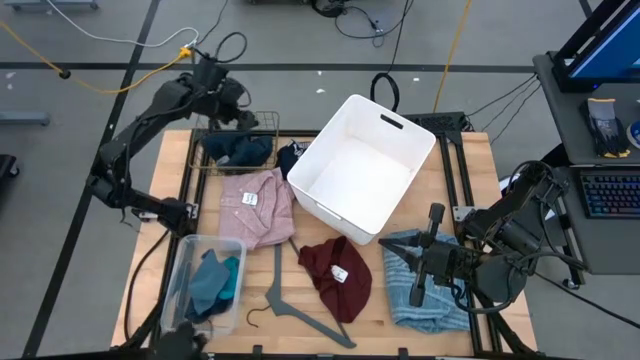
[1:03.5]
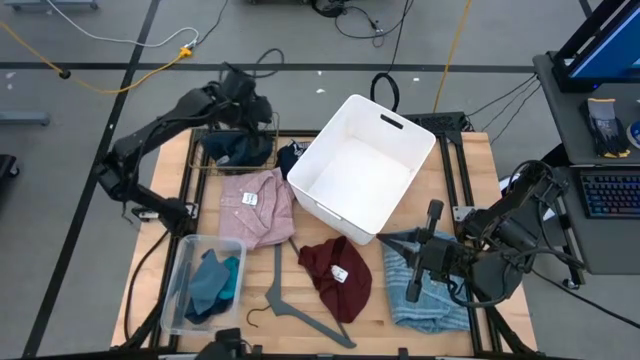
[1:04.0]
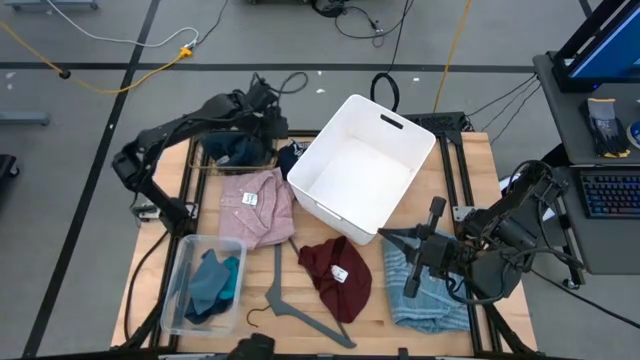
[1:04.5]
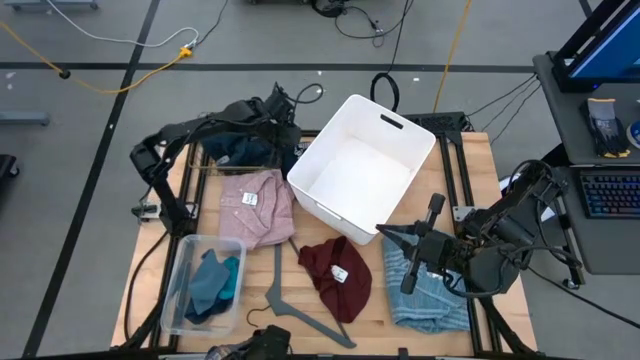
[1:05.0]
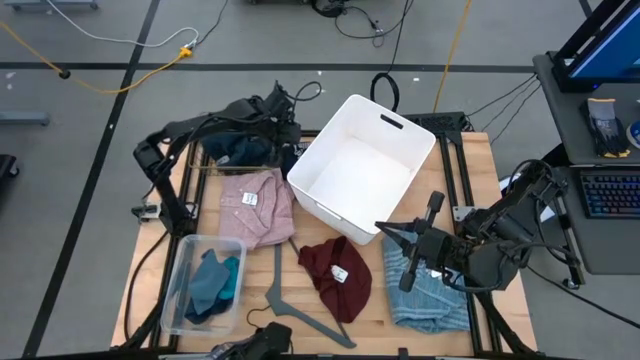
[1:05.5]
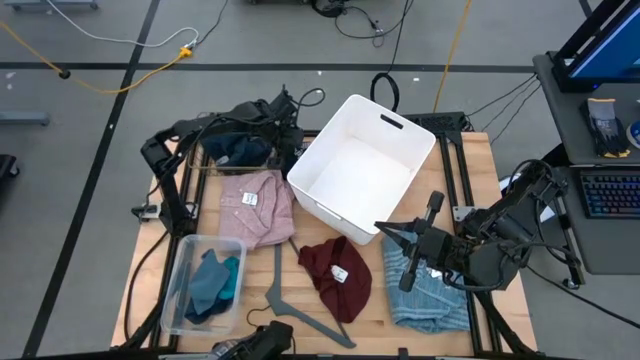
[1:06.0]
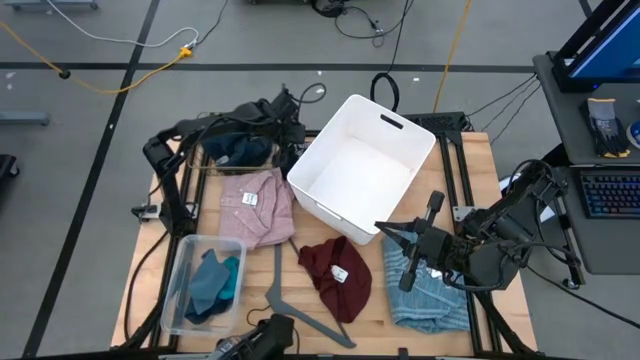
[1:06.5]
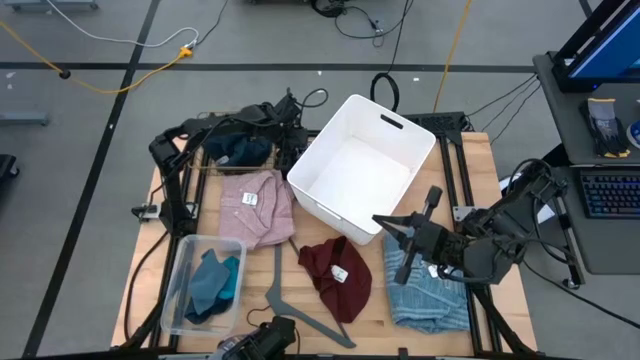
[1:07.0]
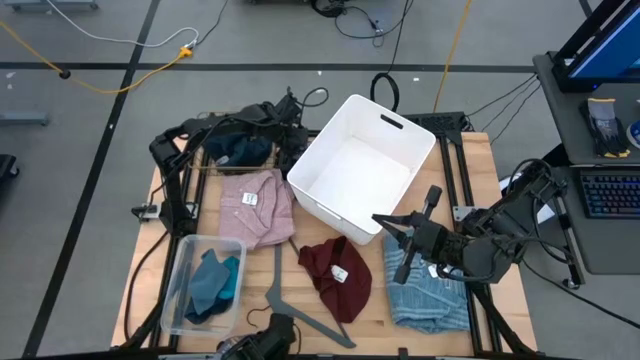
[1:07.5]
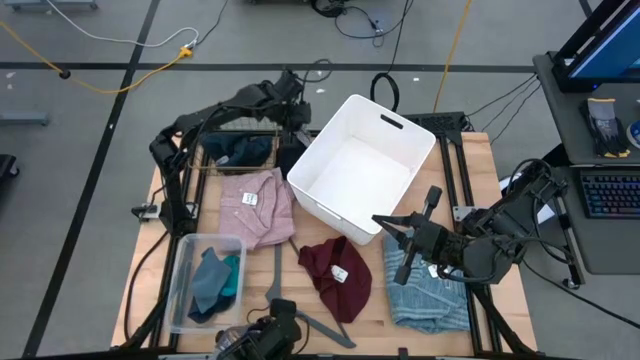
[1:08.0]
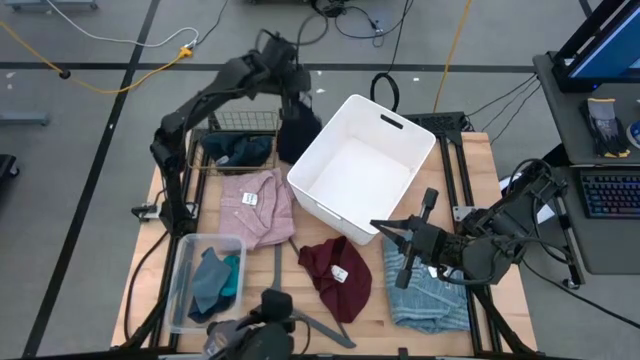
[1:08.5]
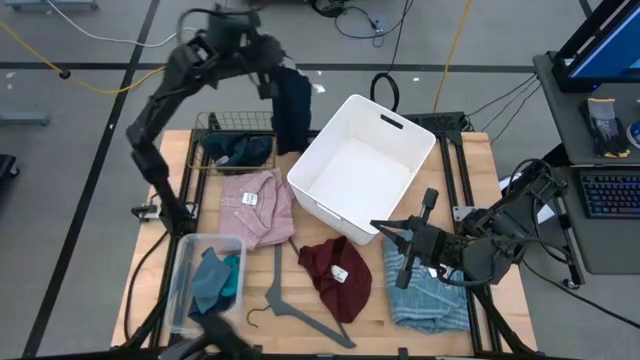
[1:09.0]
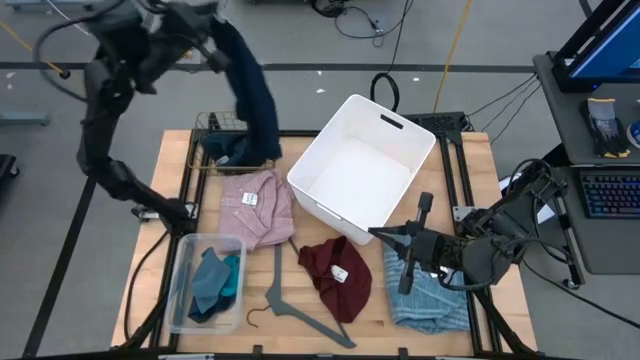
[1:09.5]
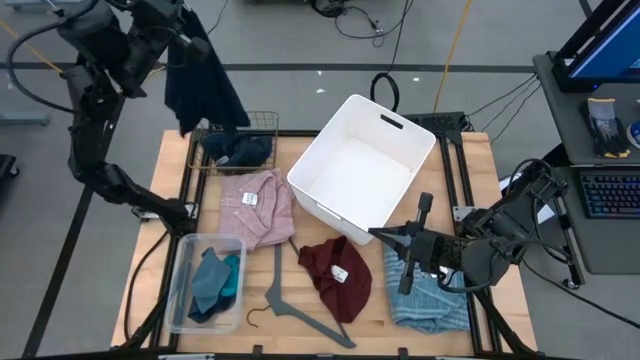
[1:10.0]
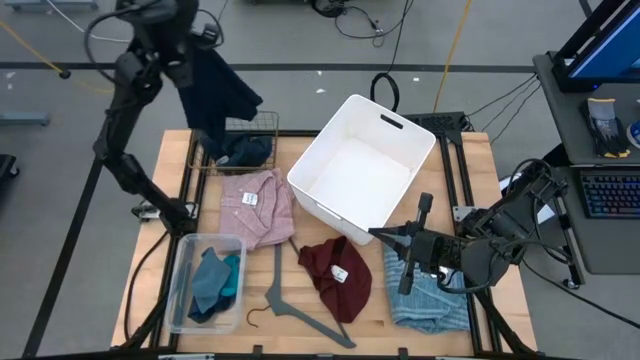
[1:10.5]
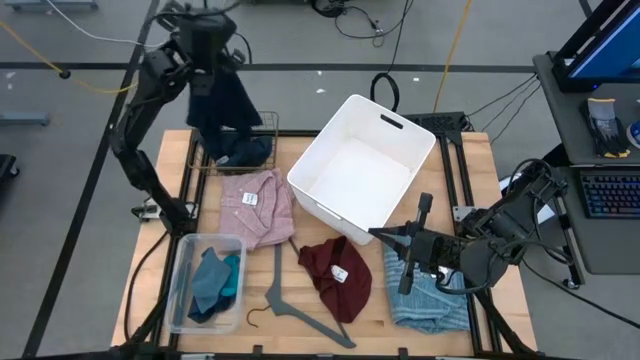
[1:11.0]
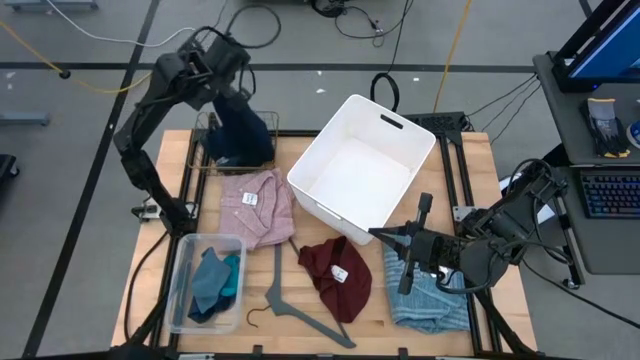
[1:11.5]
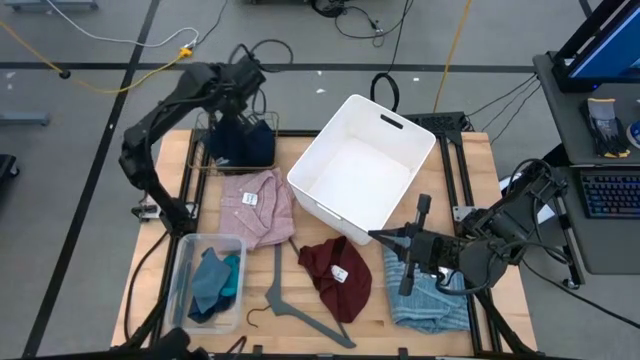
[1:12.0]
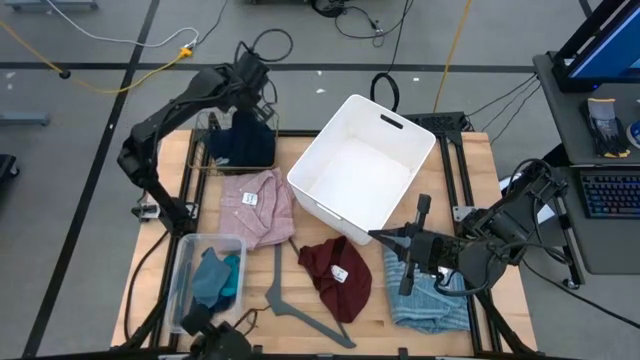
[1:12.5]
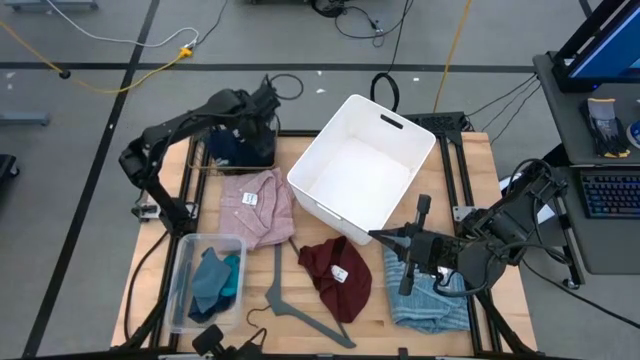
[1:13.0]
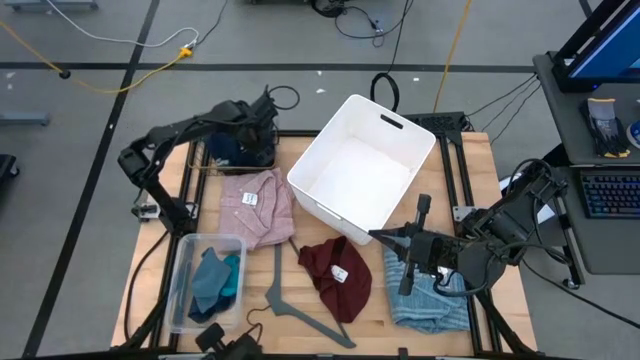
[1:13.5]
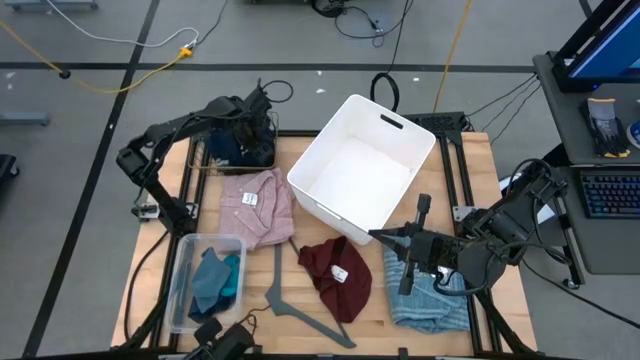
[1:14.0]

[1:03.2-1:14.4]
Task: Pick & Place Cloths
Put the blue underwear into the wire basket

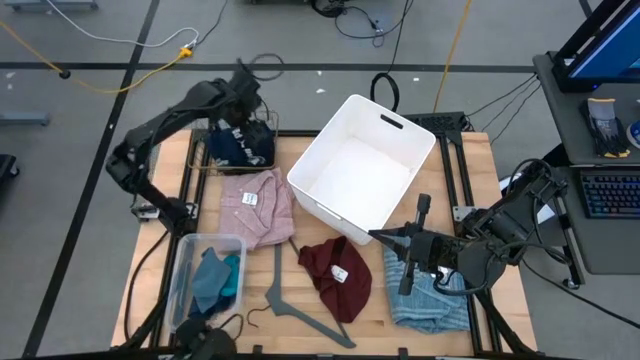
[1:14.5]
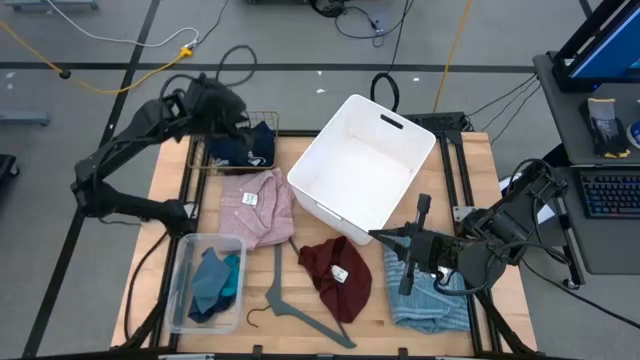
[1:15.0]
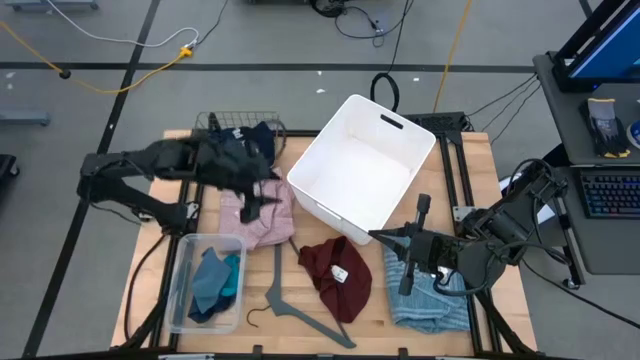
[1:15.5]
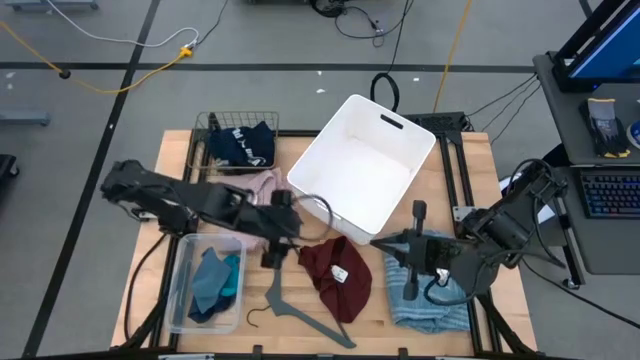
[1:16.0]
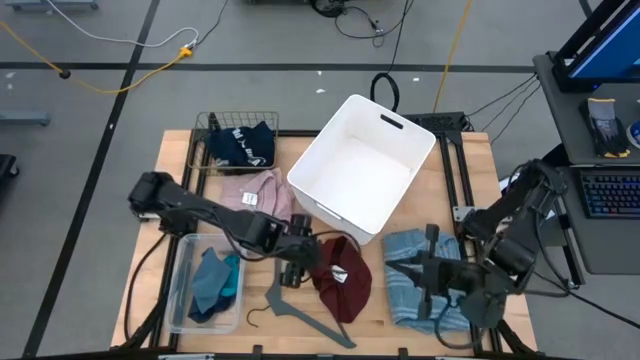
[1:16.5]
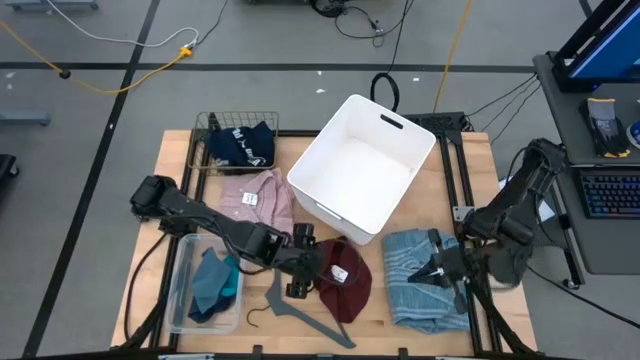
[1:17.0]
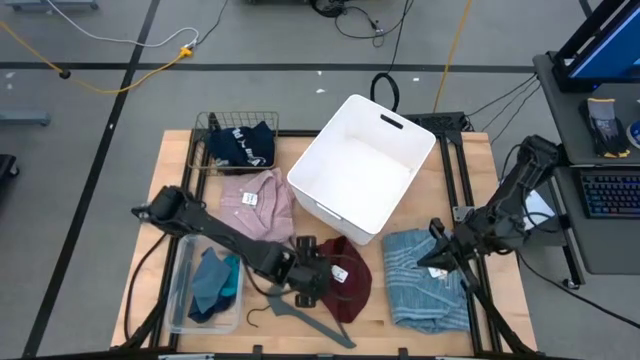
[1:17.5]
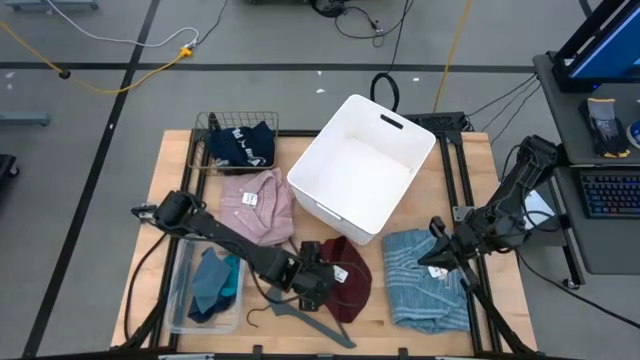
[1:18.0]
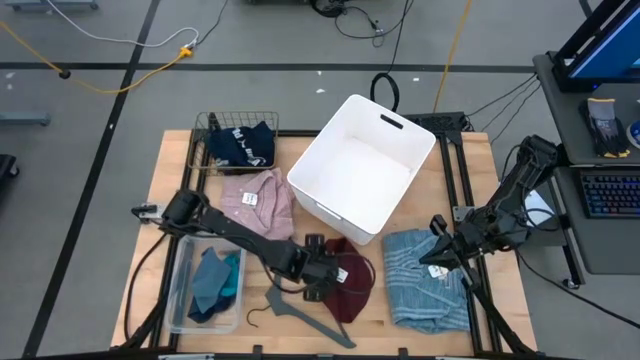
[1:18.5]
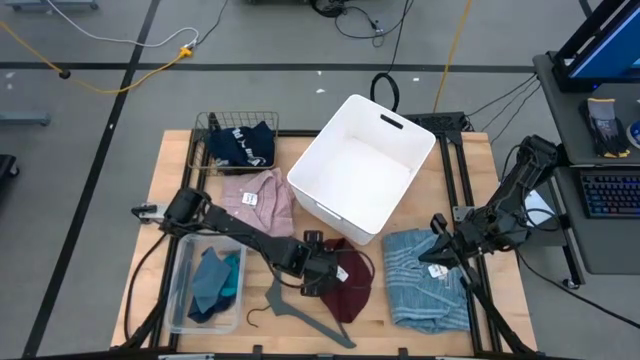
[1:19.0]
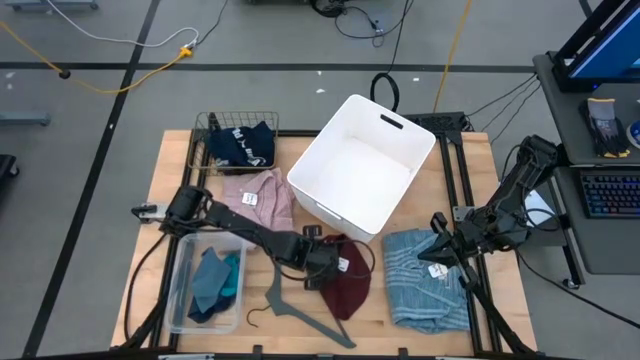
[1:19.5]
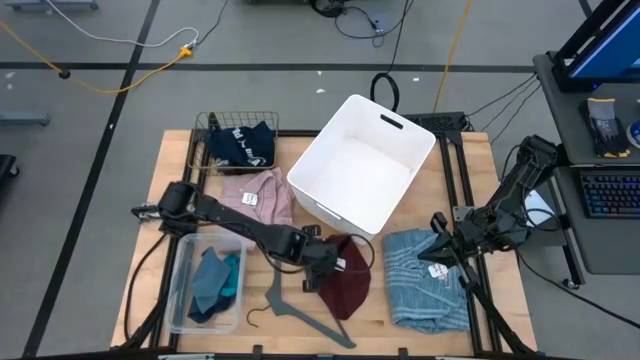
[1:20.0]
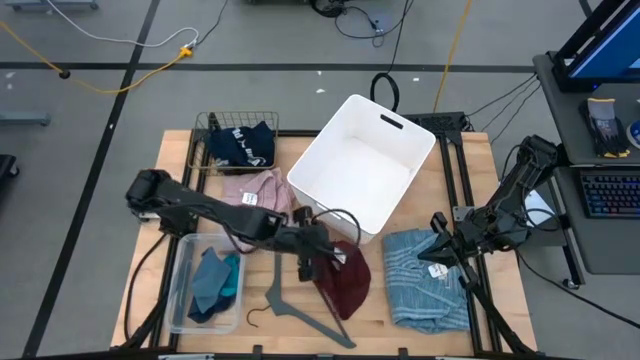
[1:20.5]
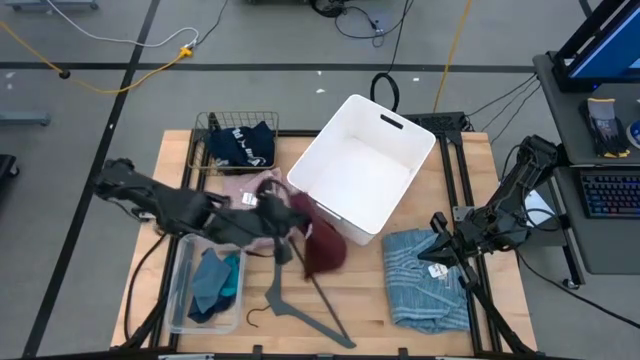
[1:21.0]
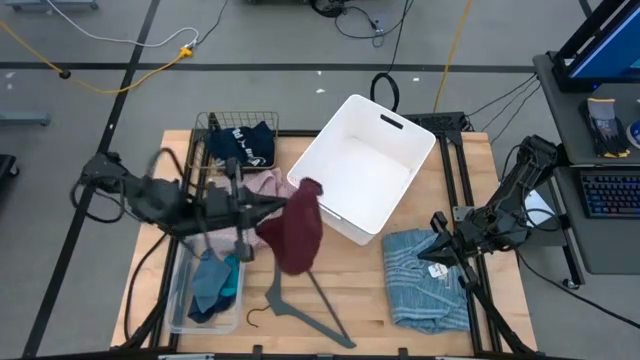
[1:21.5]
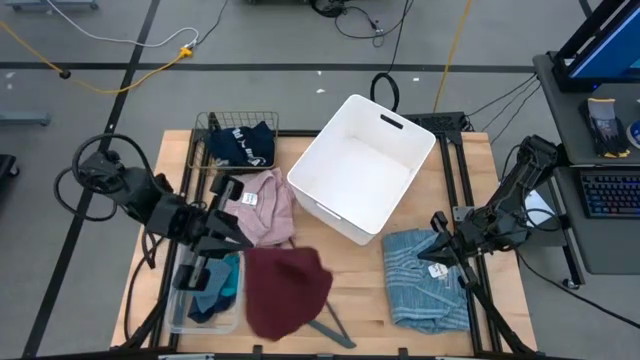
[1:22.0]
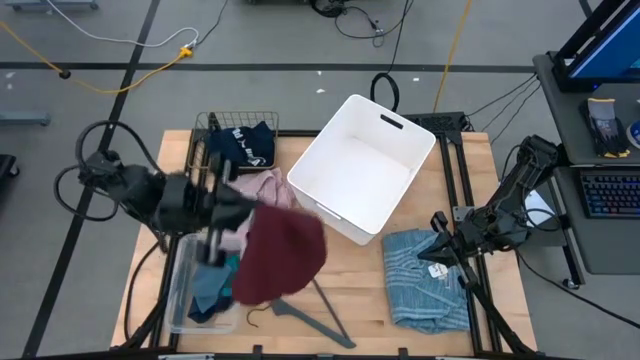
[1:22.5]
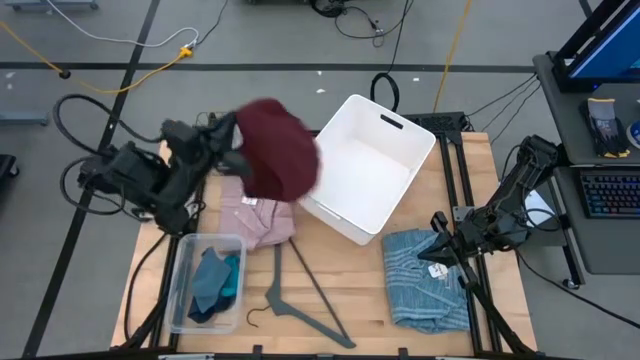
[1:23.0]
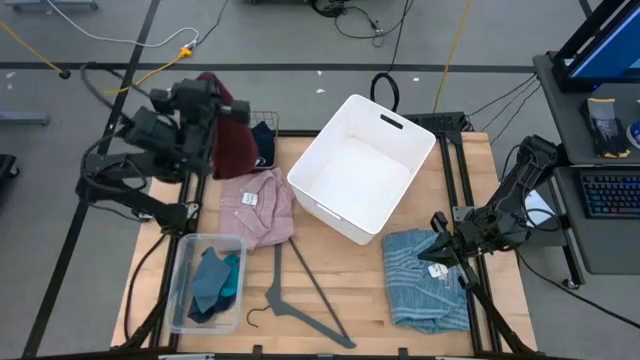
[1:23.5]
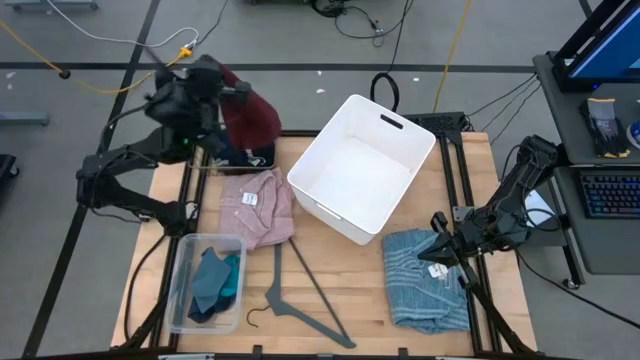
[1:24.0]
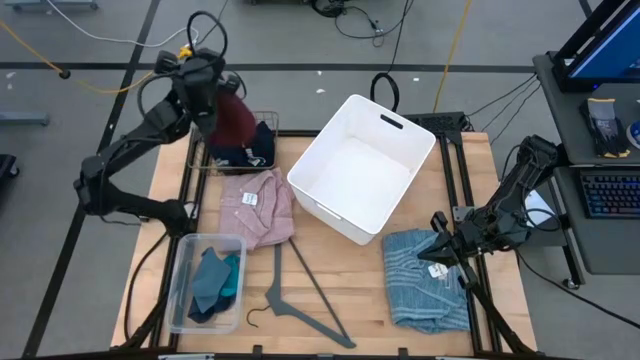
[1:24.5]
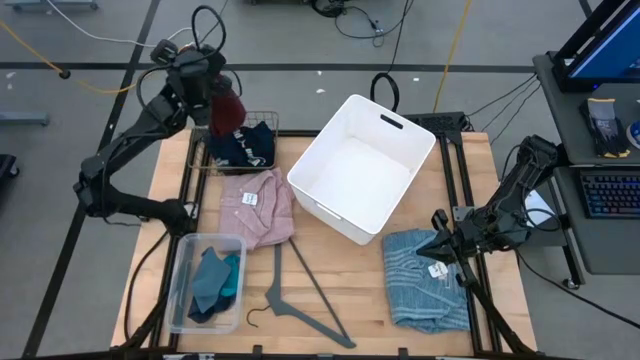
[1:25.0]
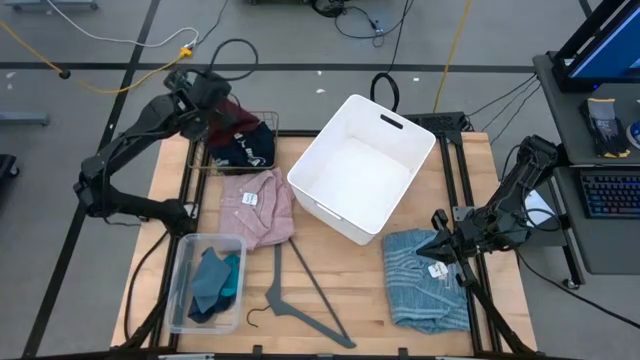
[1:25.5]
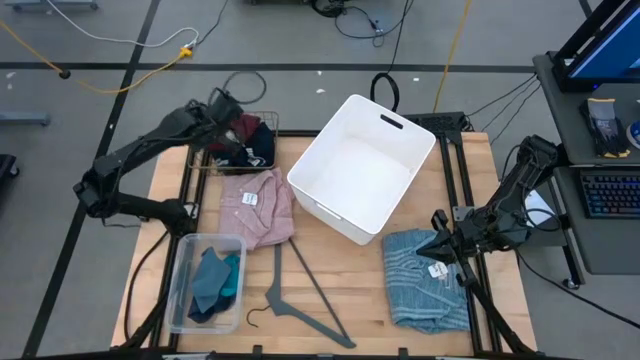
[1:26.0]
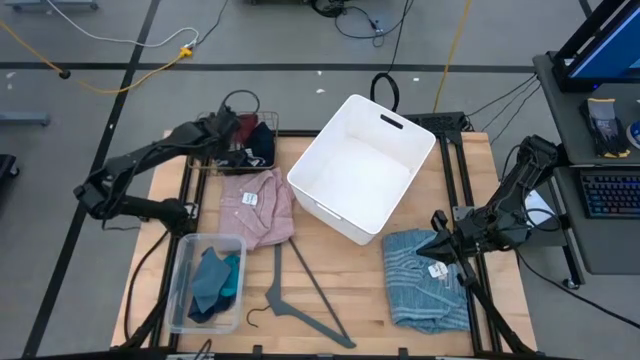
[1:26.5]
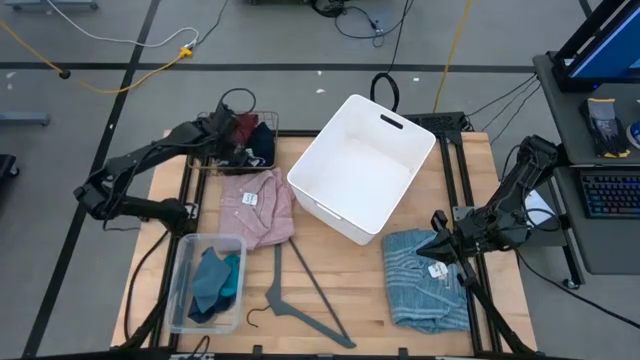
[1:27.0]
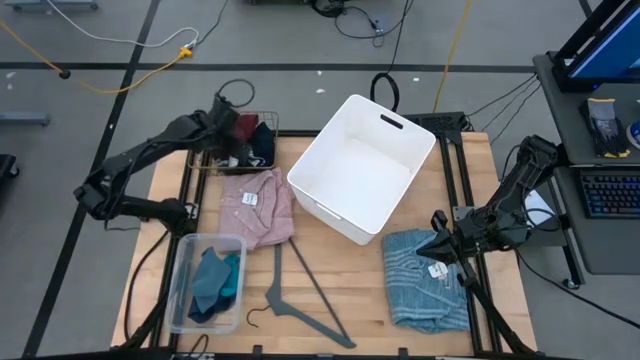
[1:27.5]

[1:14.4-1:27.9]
Put the red underwear into the wire basket
